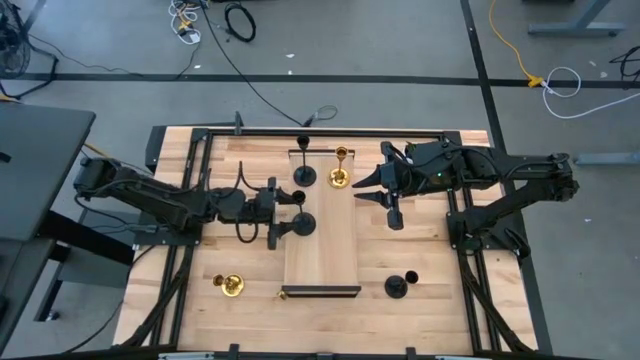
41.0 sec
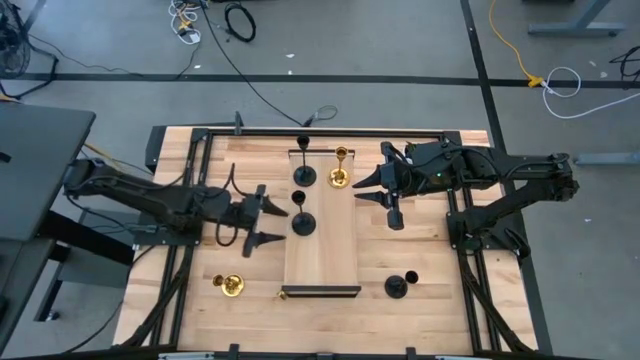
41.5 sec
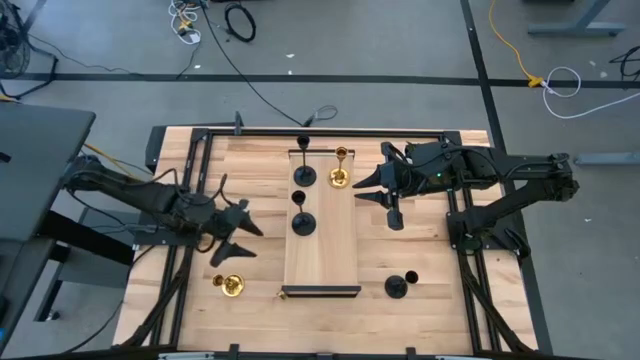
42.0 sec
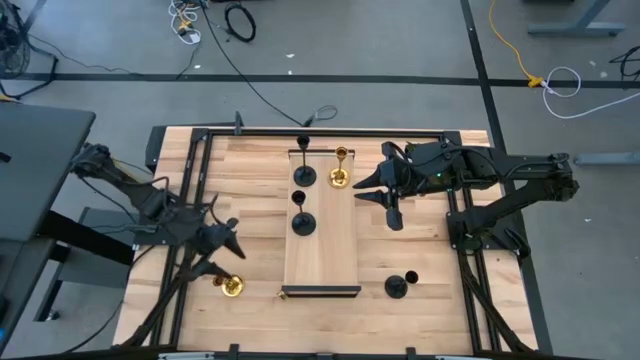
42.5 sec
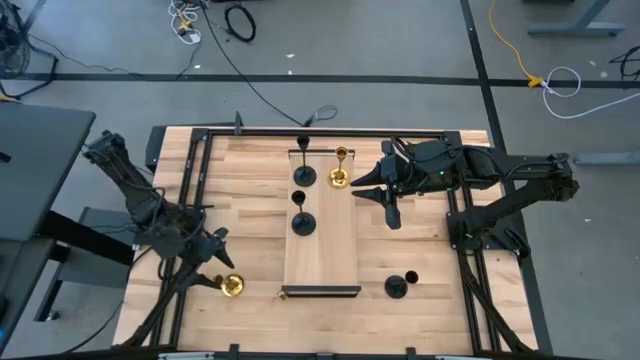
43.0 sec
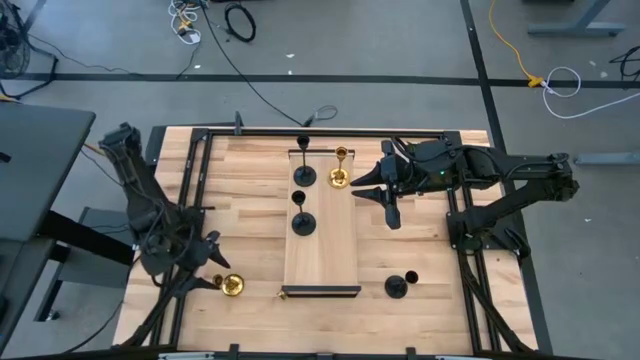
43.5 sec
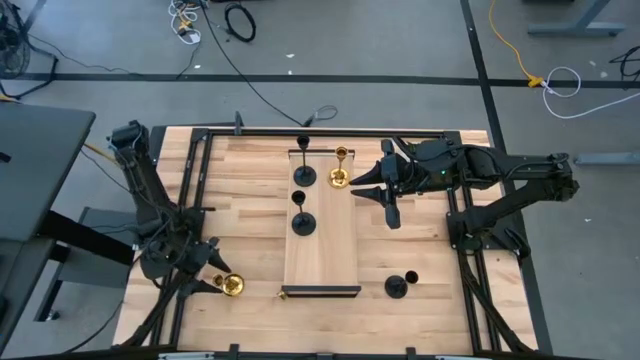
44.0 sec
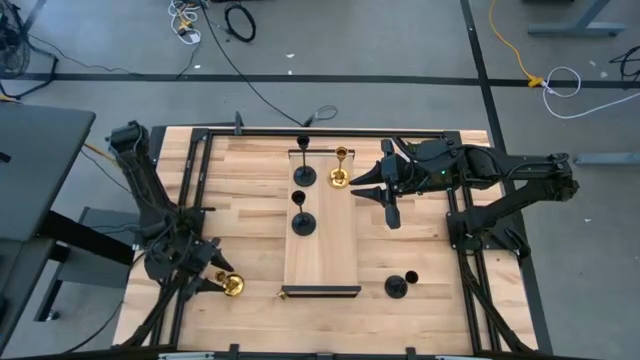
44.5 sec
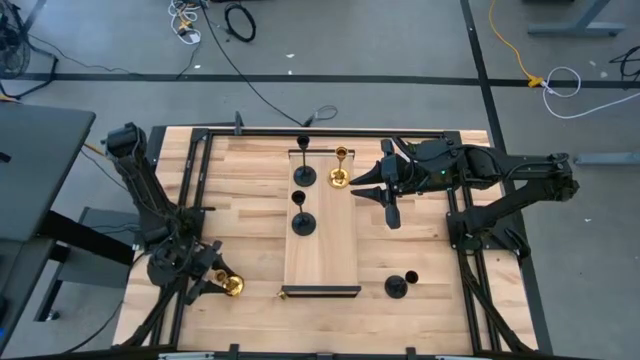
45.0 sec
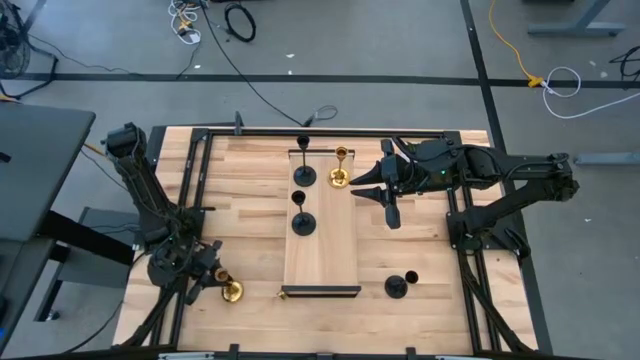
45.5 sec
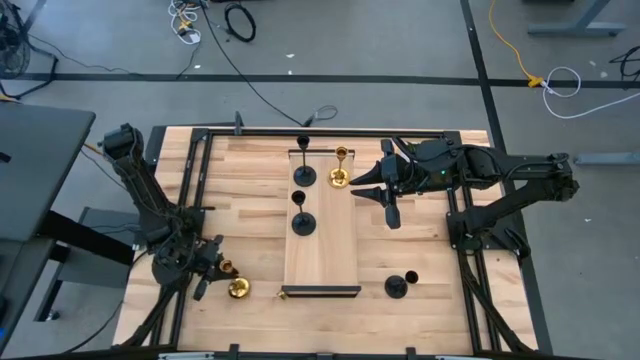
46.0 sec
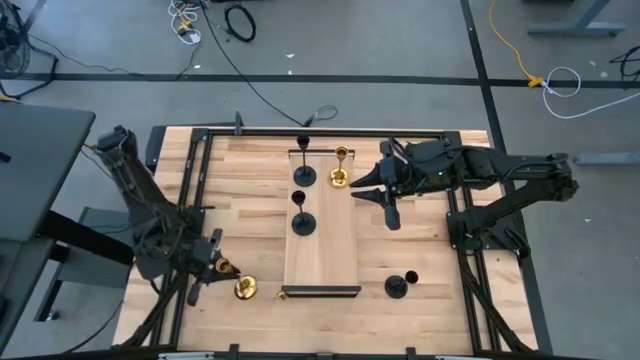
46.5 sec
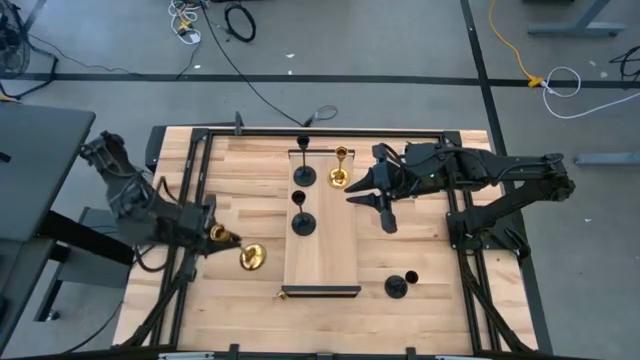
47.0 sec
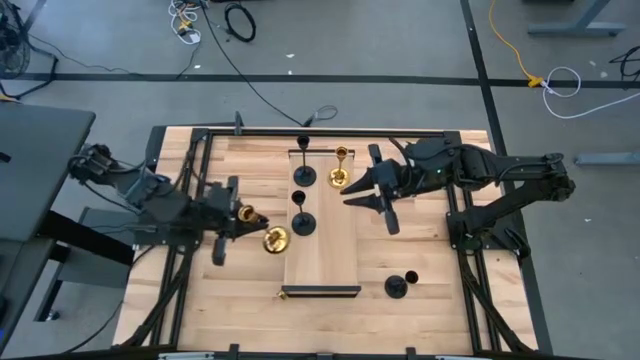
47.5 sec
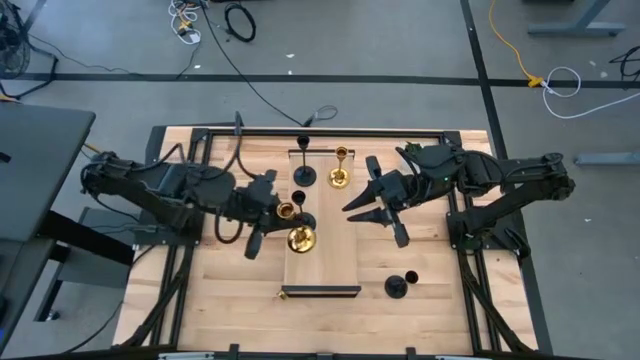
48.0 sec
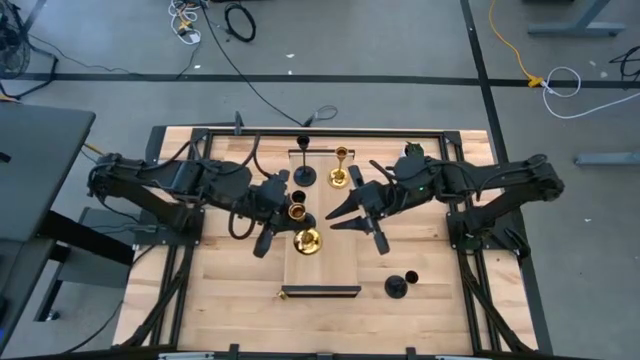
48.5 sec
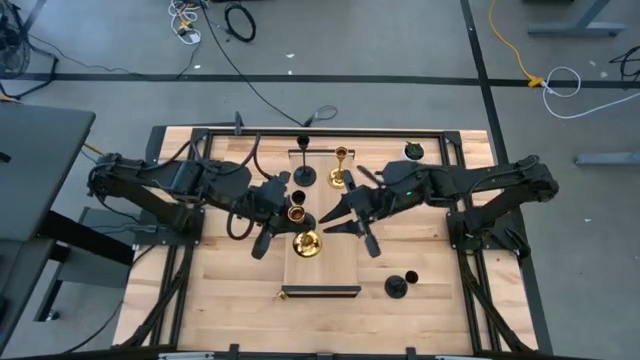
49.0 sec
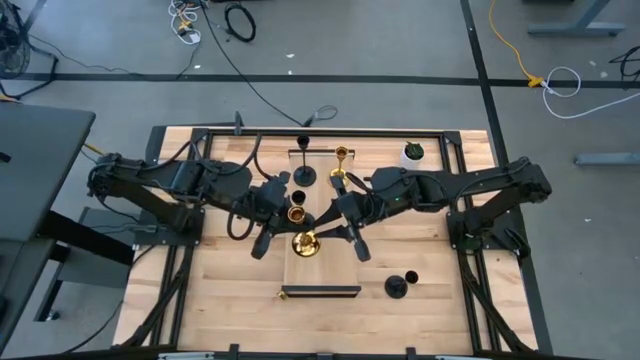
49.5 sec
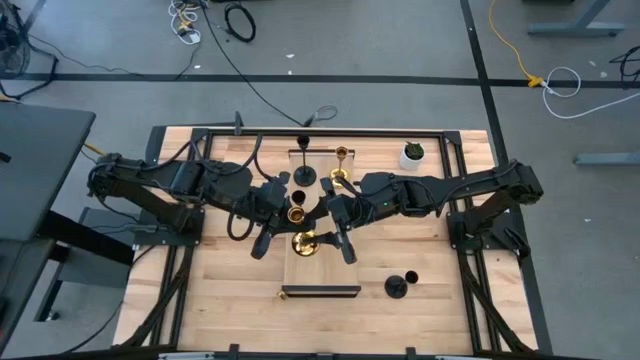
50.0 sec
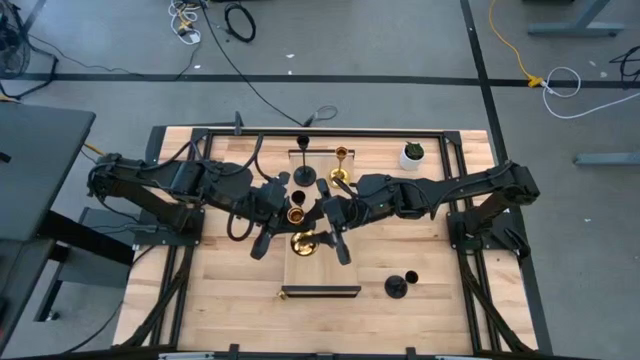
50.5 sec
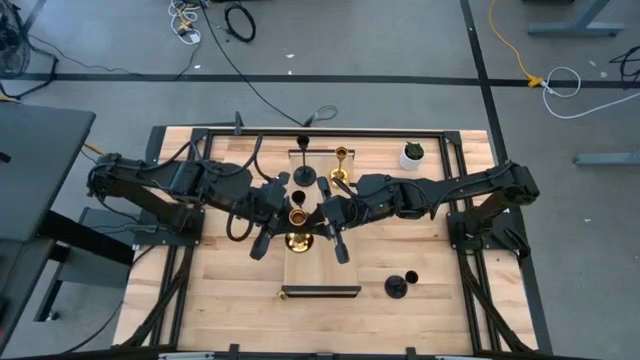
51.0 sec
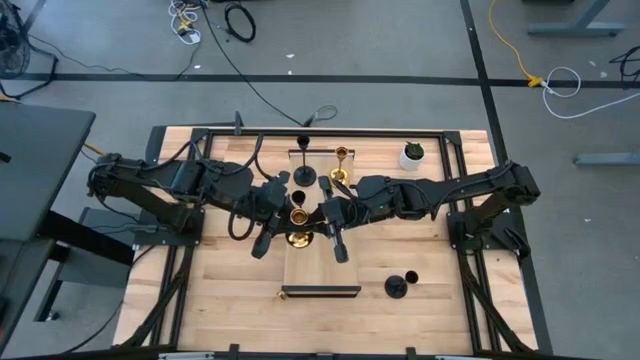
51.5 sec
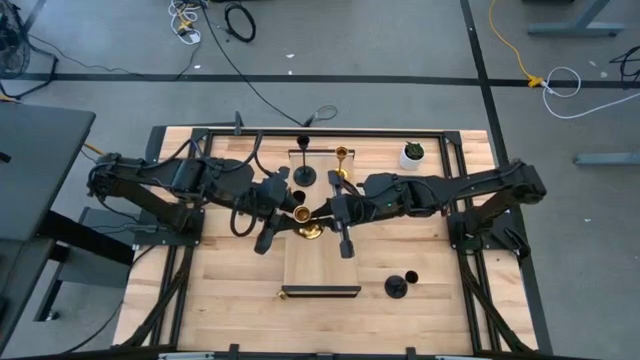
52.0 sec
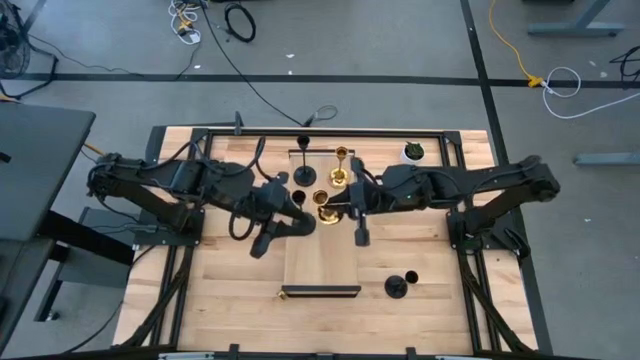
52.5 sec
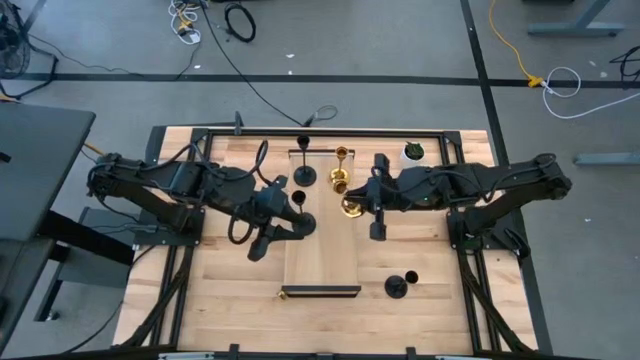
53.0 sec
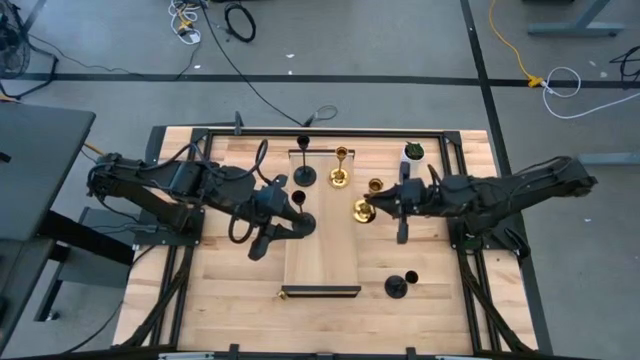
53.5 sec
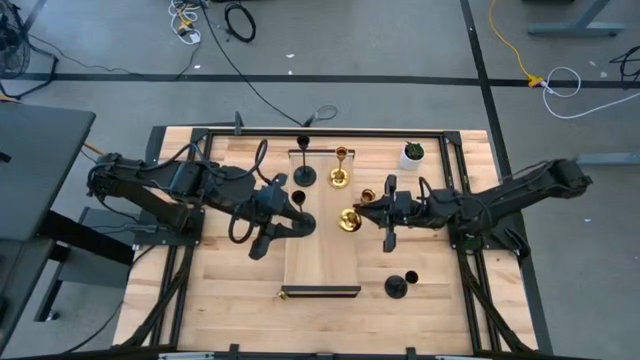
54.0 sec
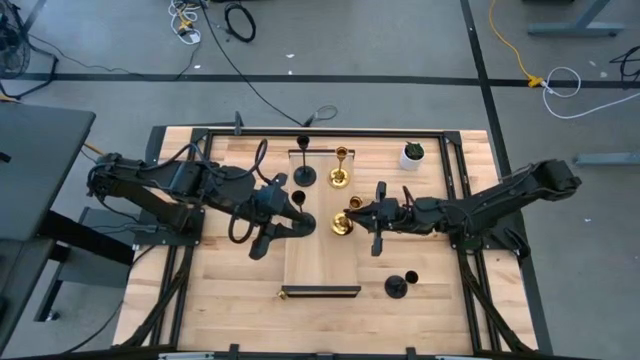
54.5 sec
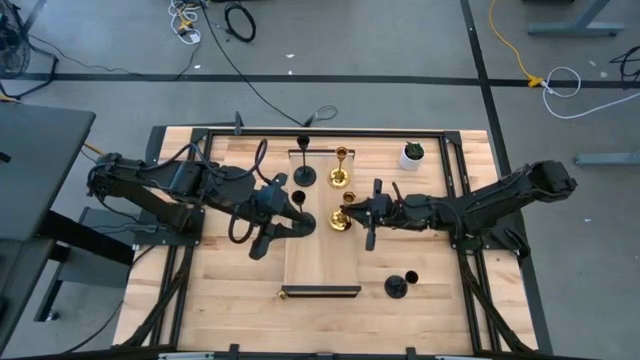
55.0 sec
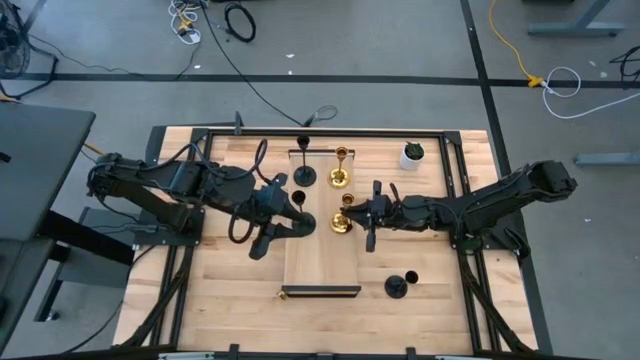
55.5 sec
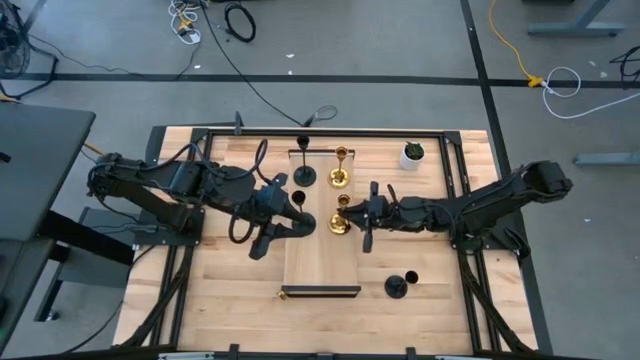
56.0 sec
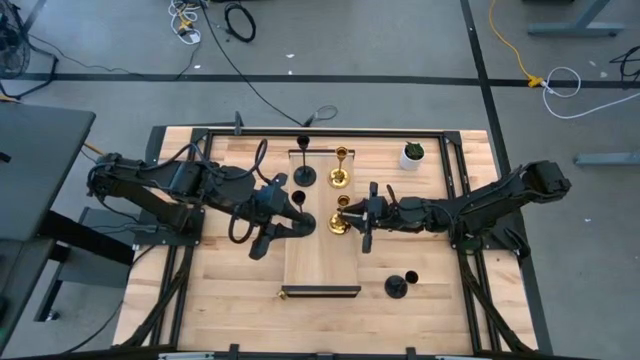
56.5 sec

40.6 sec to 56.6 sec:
Task: Pick & Place candle stick holders
Put the golden candle holder on the shelf aligned with the black candle holder

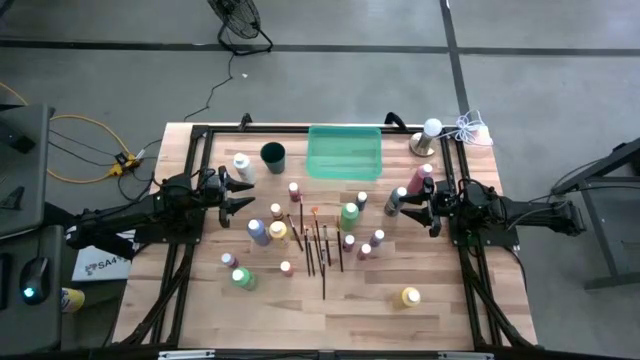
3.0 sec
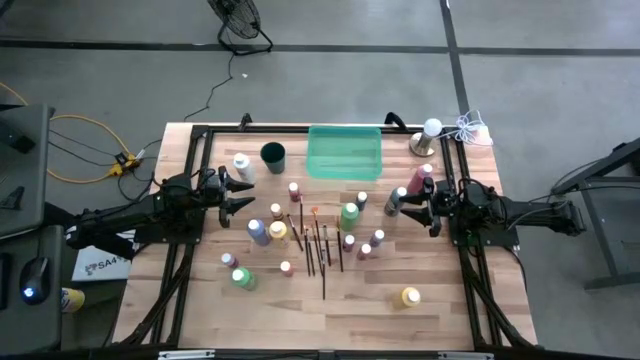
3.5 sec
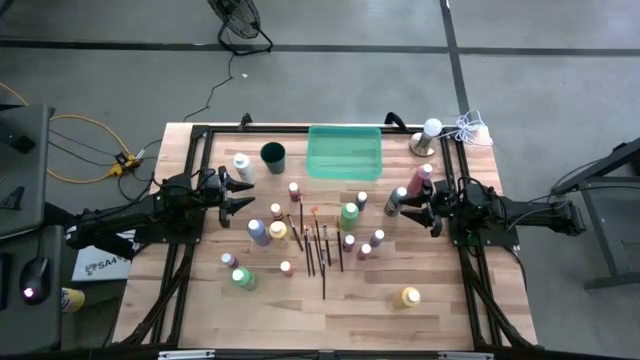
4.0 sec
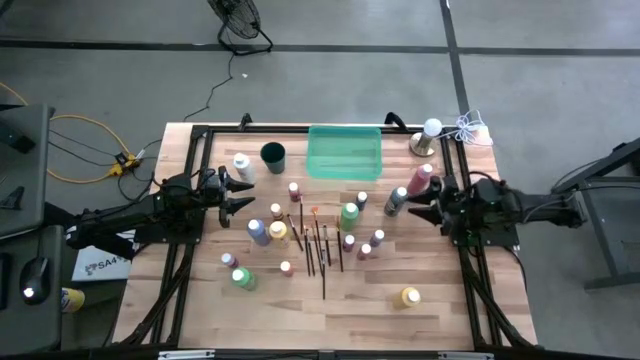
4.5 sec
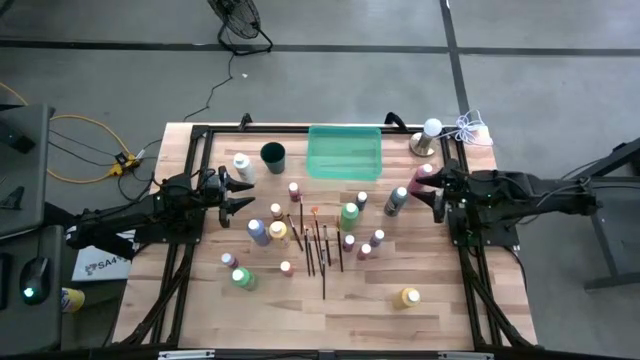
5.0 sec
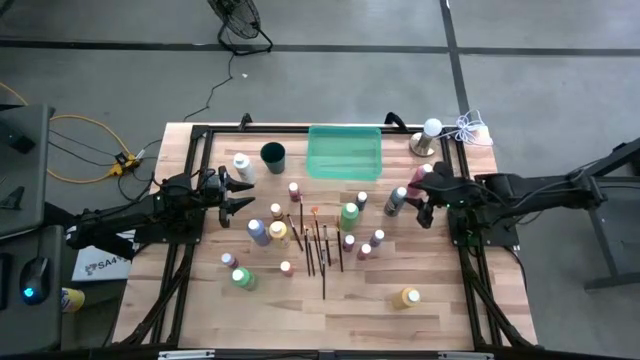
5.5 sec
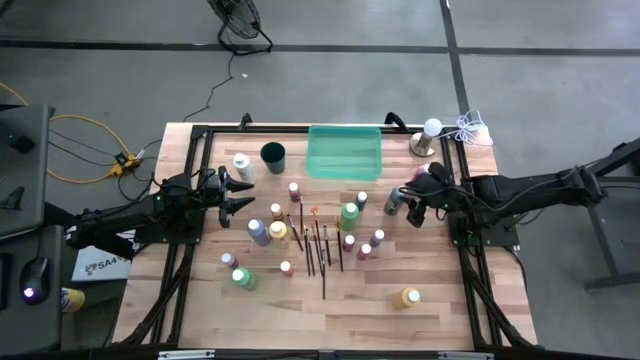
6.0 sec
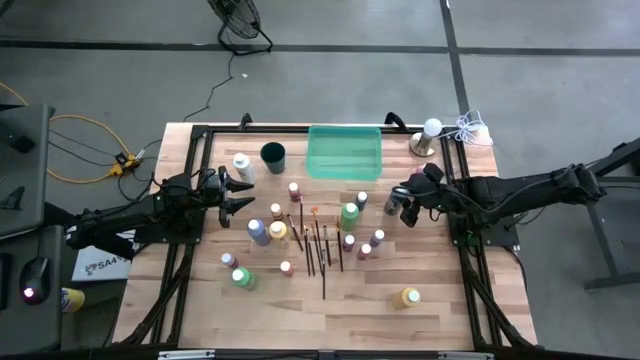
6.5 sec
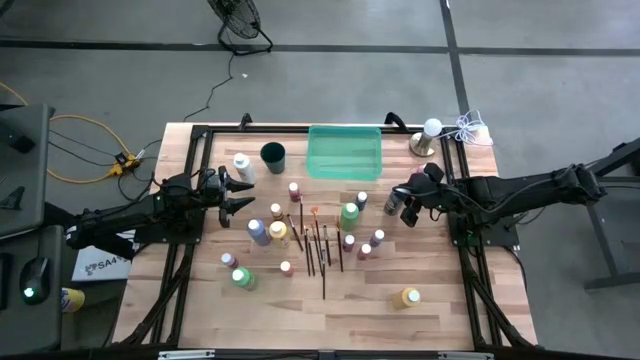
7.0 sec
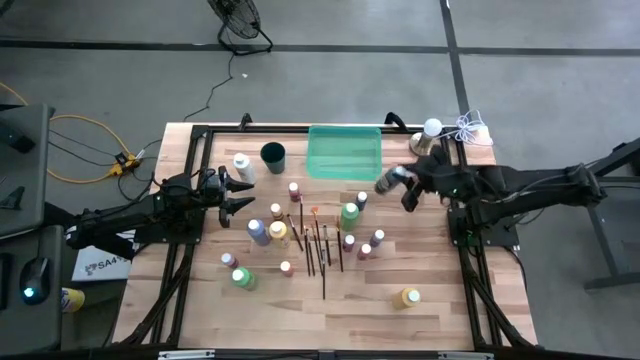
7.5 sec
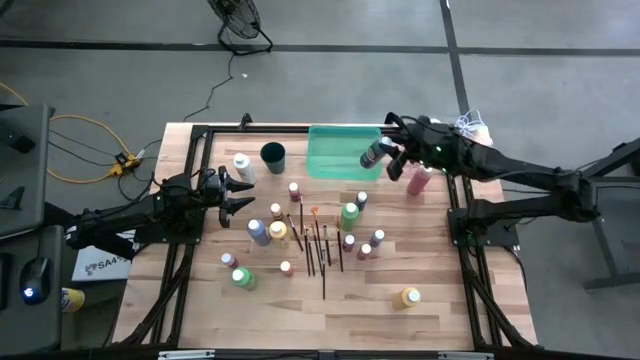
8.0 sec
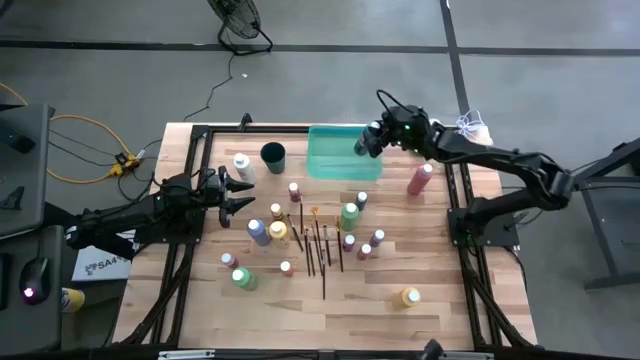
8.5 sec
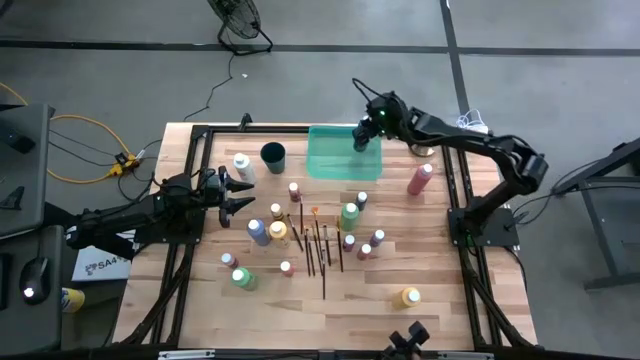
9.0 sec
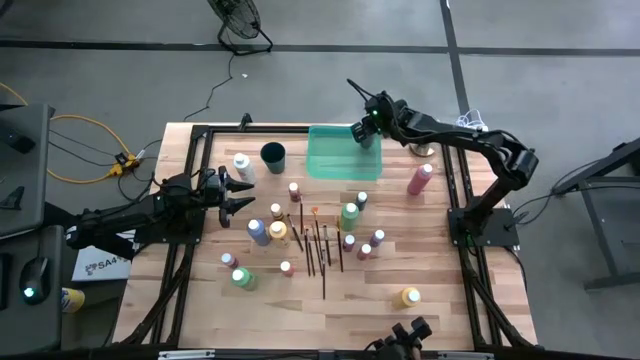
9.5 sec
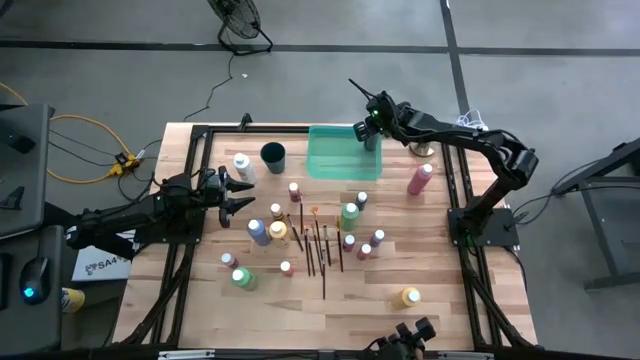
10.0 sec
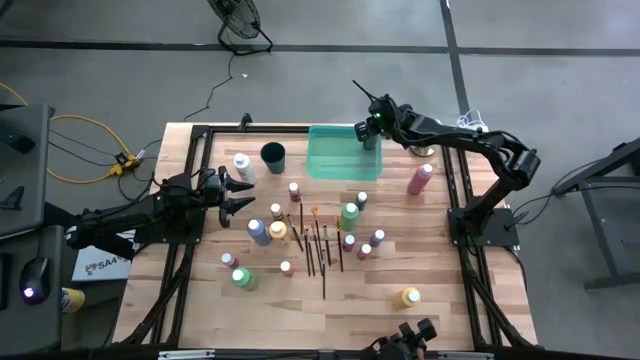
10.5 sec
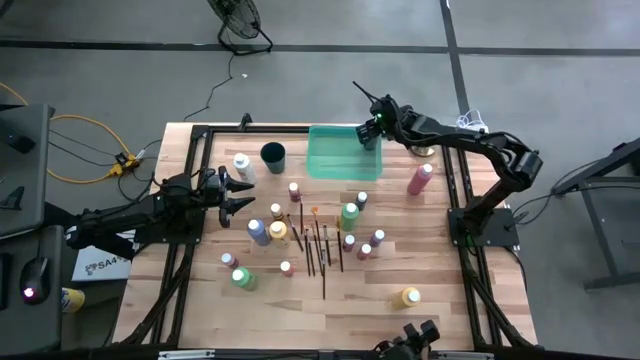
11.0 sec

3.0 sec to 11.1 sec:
Task: Pick & Place Paint Supplies
Put the large blue paint bottle into the green bin
